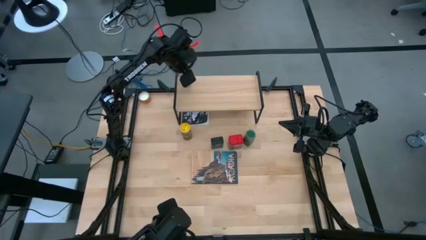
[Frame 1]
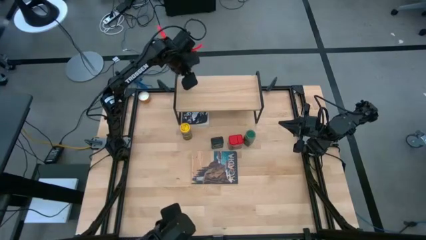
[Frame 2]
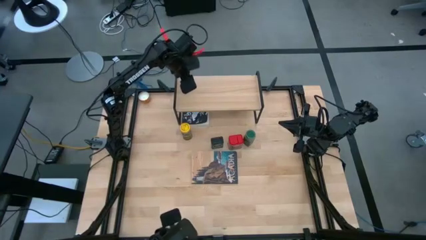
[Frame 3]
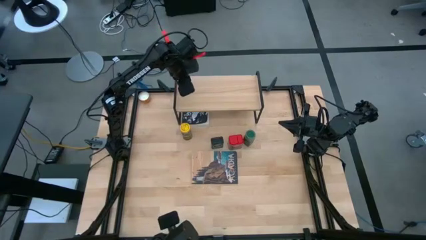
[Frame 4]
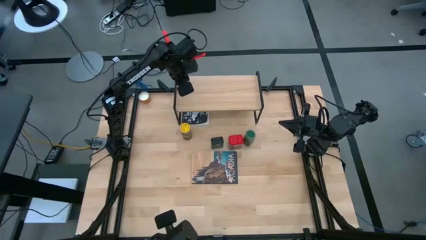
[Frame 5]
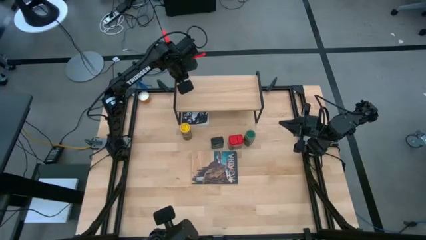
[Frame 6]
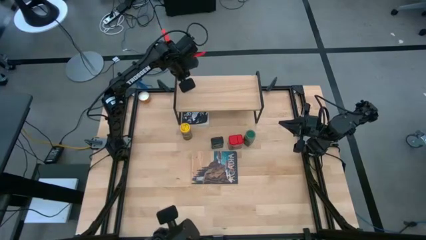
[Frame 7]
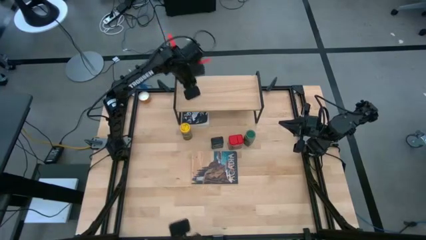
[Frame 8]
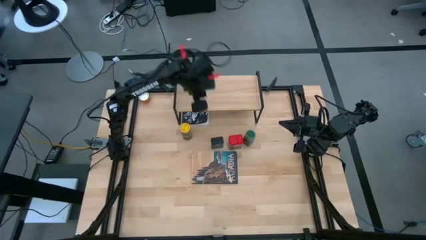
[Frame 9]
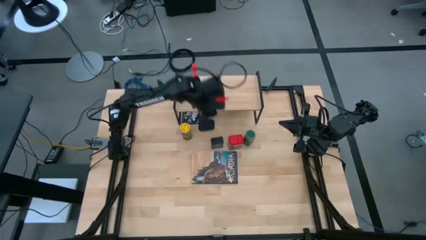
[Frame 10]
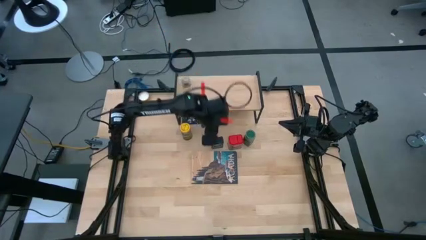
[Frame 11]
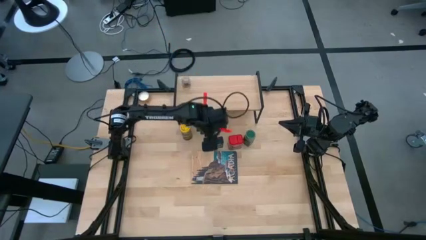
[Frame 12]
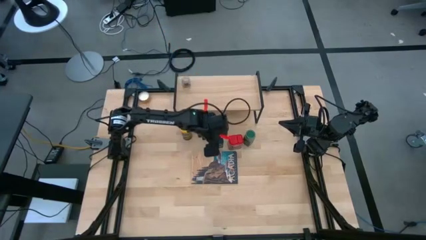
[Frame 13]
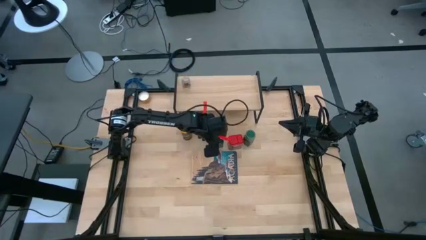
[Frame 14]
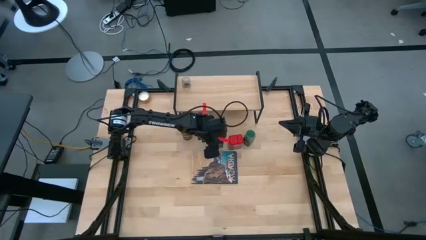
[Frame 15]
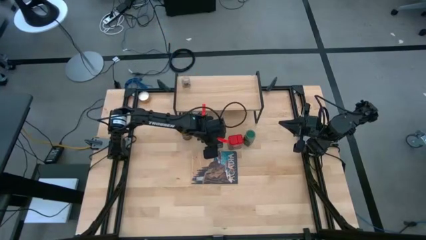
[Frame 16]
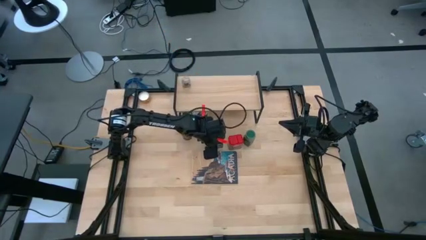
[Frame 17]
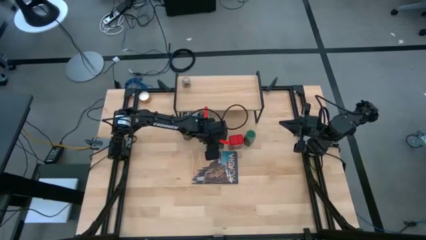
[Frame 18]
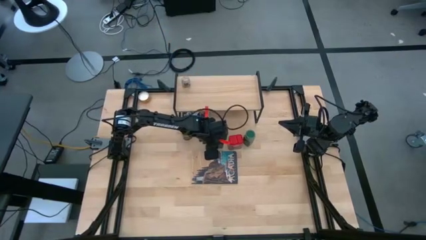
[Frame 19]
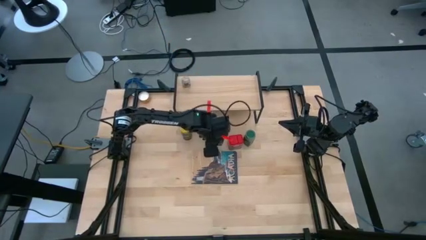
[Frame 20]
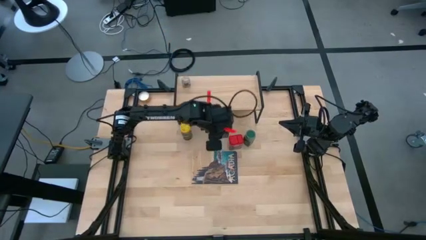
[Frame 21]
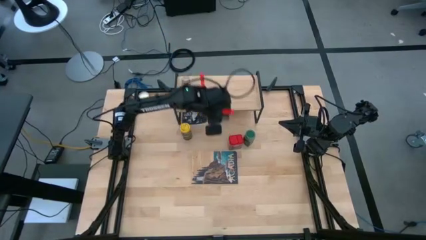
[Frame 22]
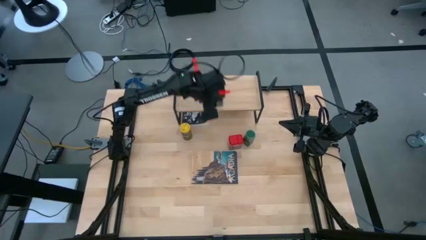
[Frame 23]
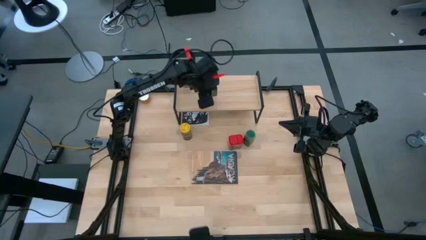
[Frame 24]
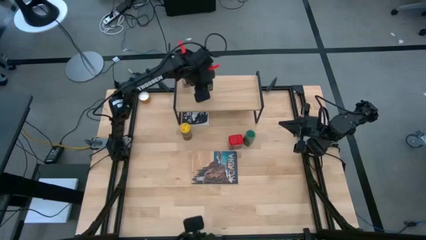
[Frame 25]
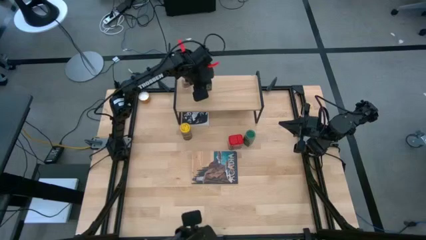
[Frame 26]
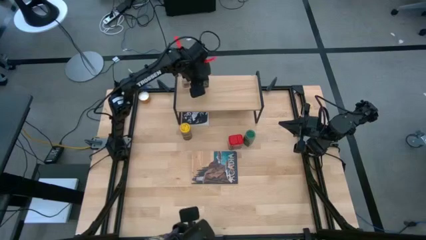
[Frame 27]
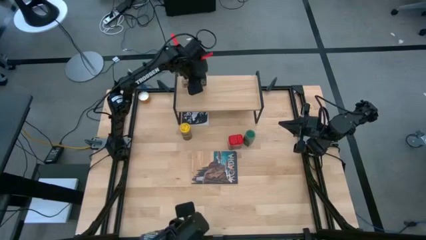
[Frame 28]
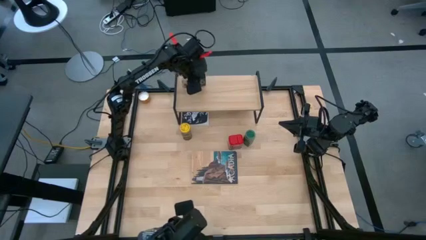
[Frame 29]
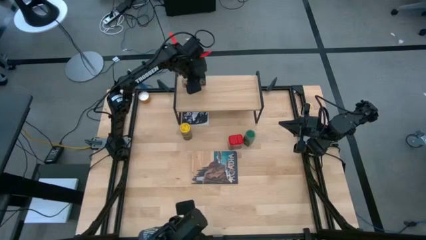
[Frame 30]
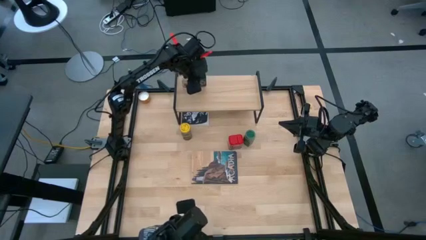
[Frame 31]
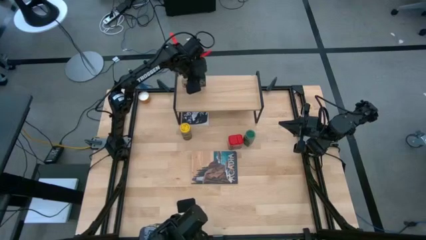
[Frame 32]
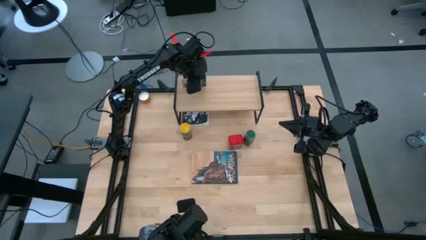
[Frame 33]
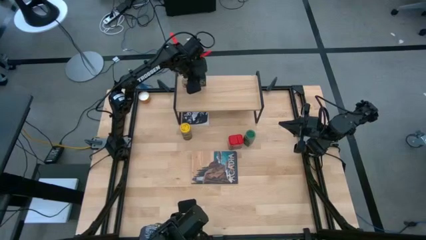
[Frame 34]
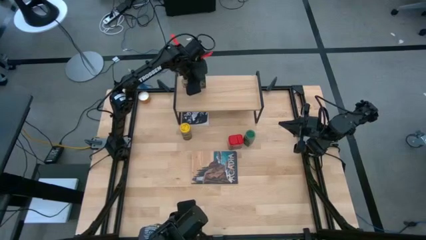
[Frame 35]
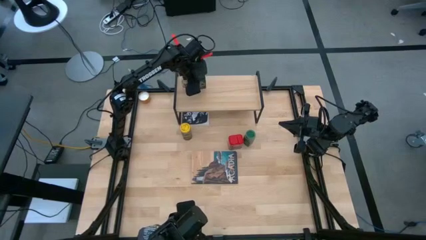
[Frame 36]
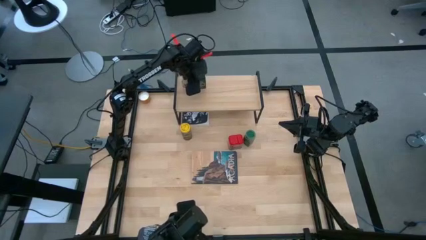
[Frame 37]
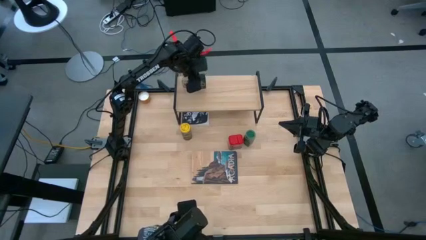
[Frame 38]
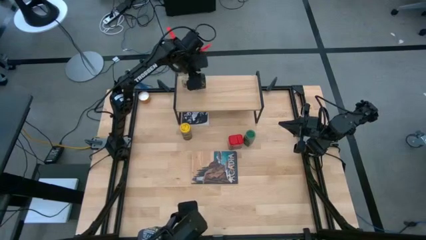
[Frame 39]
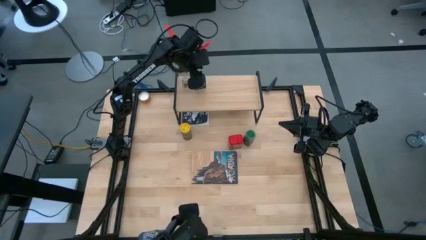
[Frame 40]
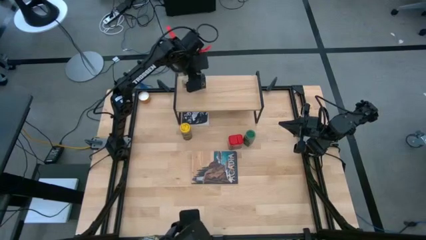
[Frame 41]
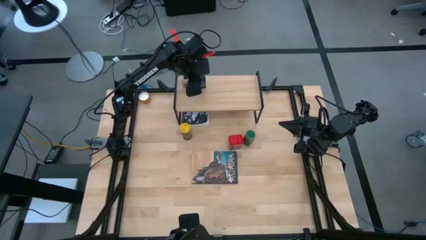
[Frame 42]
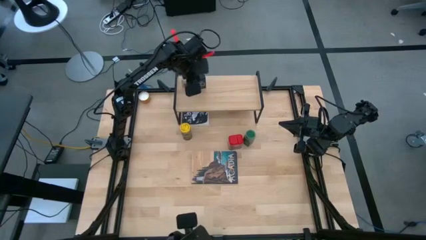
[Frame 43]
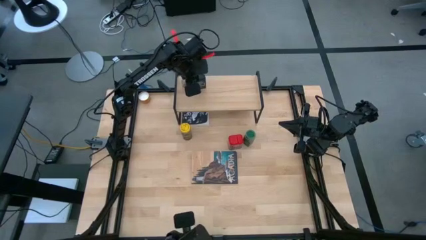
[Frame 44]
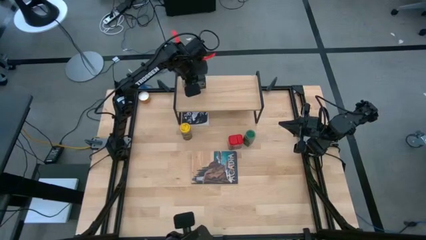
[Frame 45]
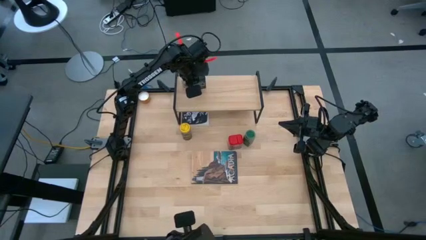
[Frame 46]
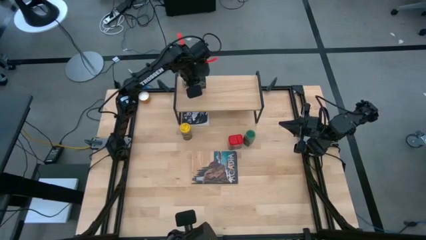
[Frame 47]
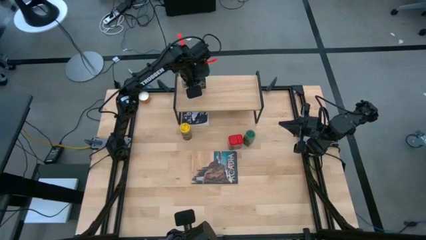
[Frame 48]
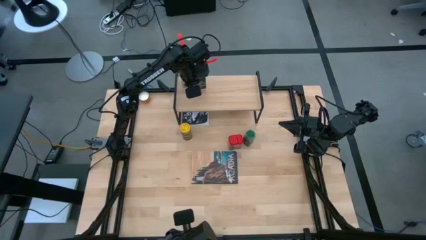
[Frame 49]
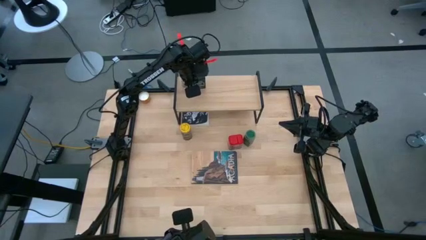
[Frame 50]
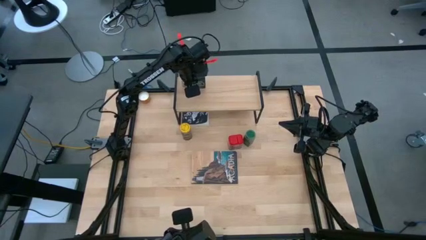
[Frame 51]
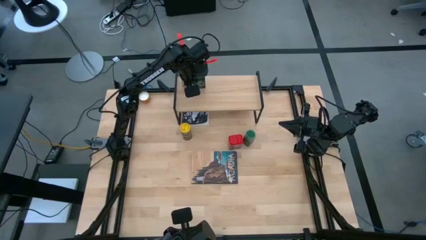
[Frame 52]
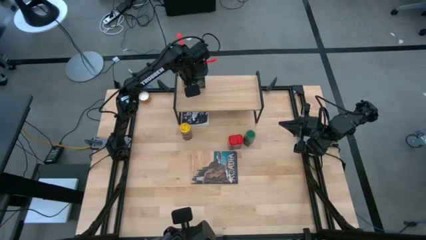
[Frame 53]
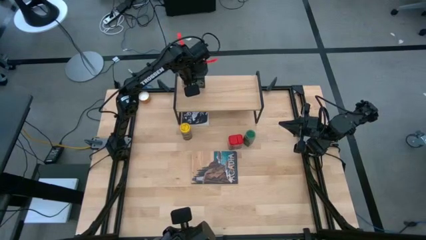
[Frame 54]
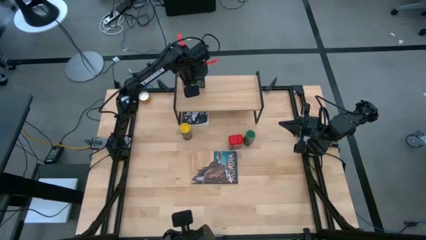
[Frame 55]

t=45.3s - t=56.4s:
Task: Shelf spices
Put the black seasoning can on the shelf

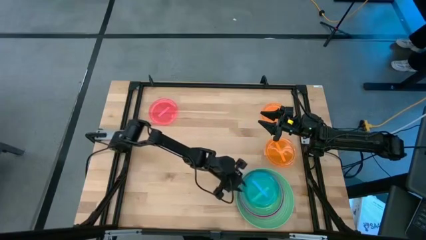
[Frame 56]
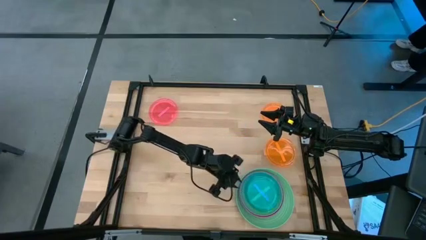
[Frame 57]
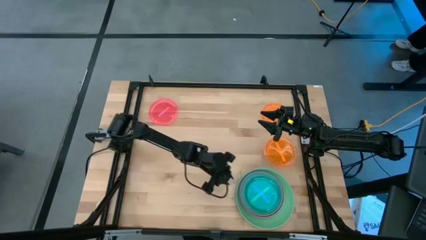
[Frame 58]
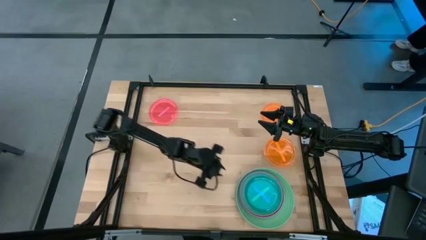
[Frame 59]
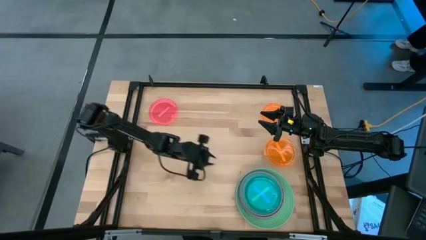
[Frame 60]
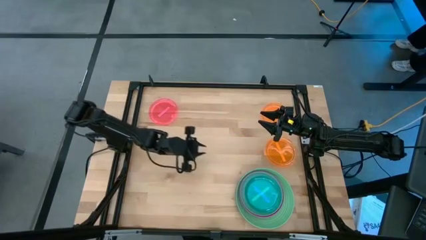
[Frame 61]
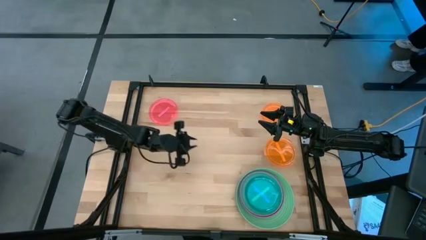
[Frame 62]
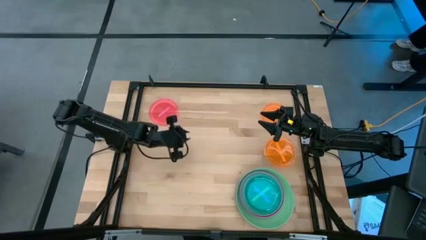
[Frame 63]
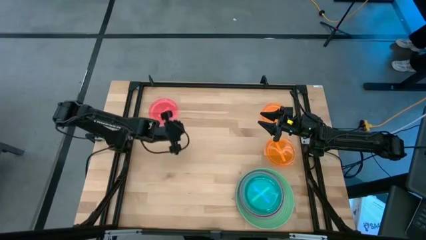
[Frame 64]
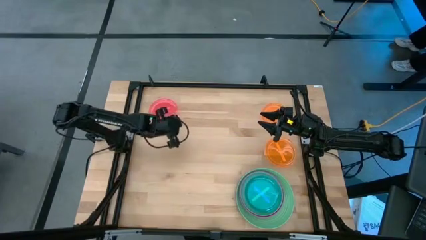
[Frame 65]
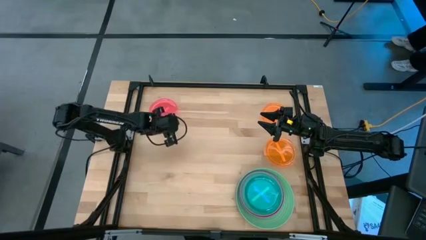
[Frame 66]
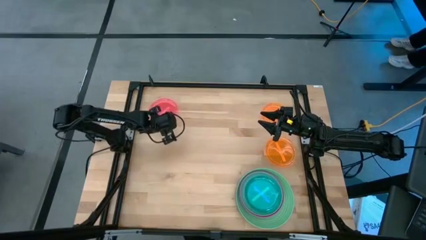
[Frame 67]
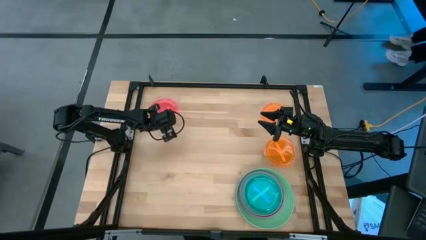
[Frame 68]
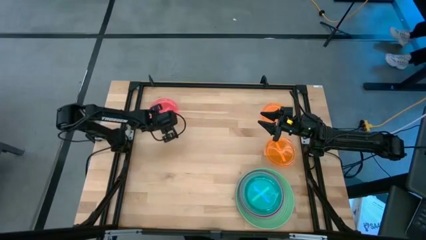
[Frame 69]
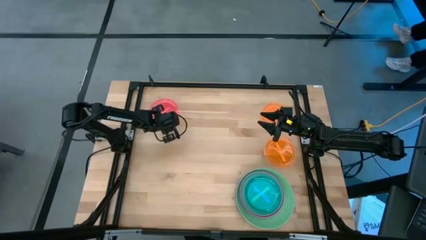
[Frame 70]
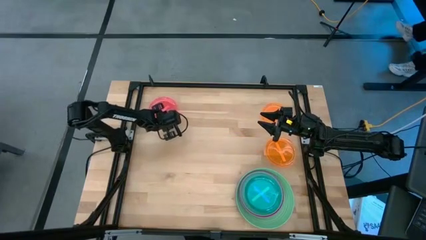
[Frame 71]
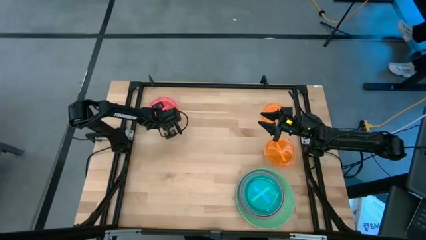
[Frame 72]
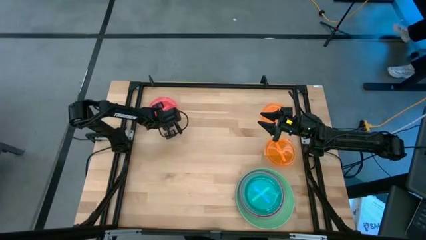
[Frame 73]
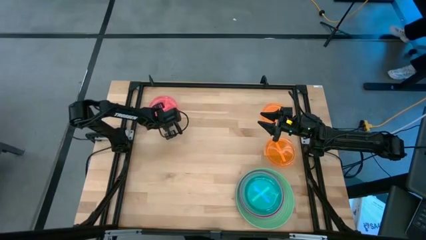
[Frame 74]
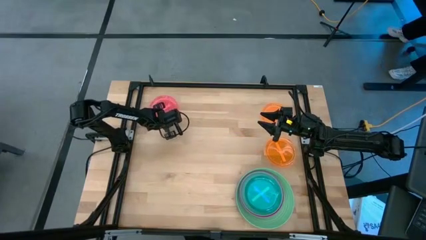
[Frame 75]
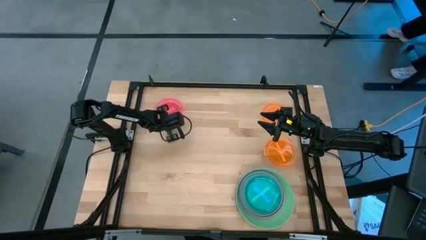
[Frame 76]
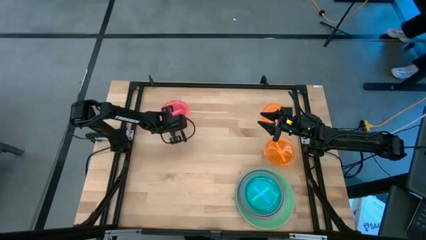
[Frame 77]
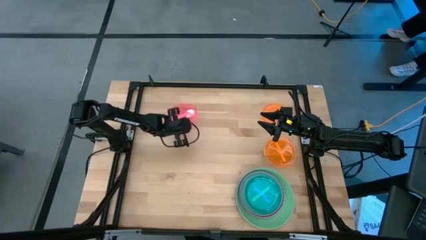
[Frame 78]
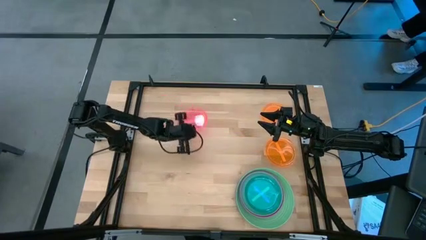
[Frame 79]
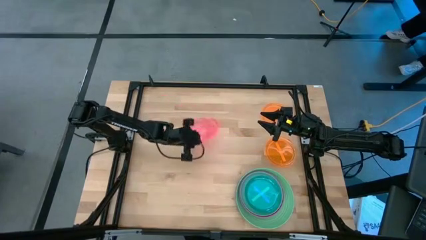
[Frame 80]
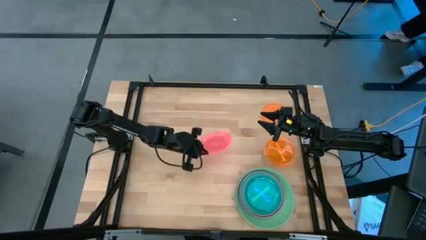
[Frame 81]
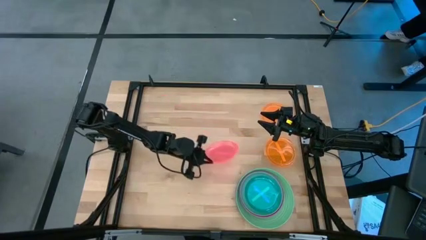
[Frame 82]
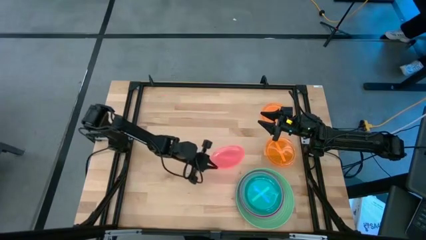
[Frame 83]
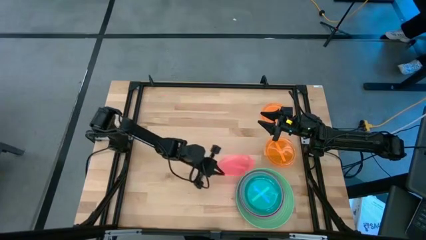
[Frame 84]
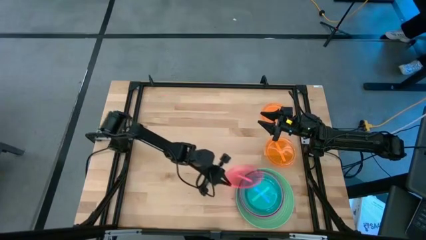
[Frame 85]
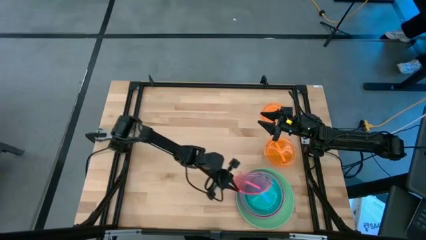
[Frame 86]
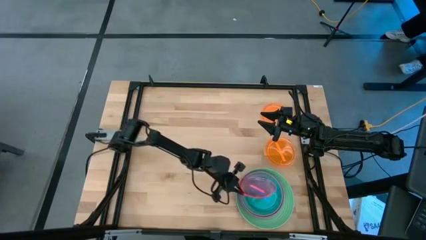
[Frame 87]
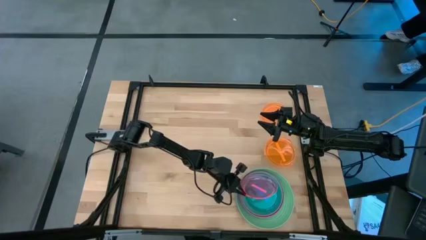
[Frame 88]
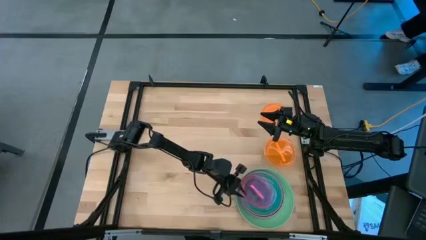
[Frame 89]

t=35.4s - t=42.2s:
Task: Stack plastic plates
Stack the red plate on top of the blue plate
